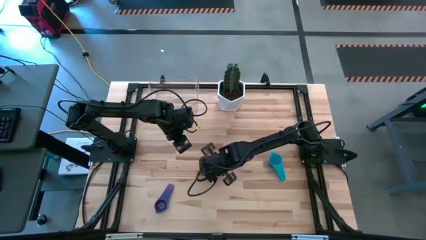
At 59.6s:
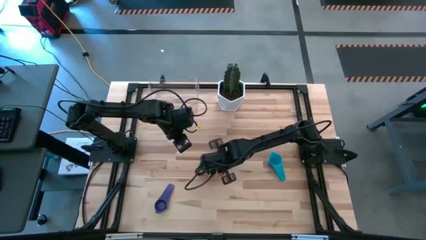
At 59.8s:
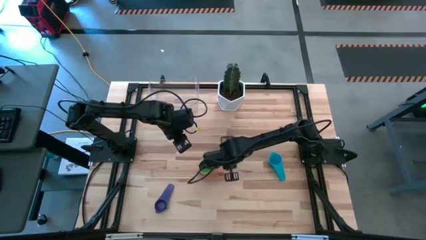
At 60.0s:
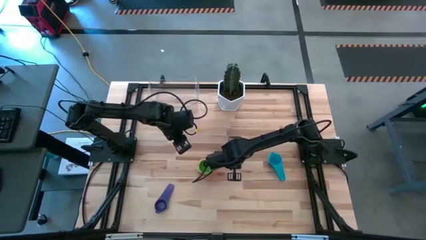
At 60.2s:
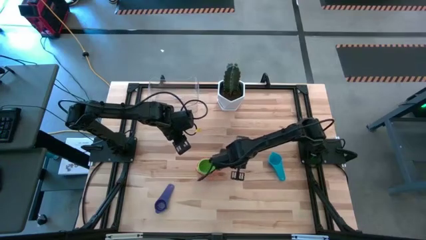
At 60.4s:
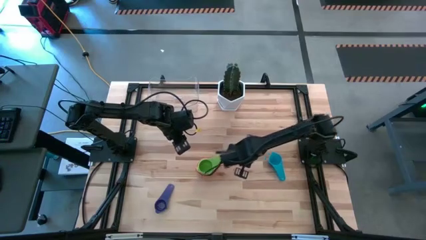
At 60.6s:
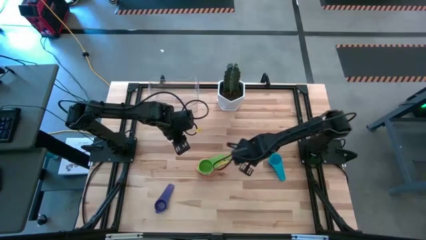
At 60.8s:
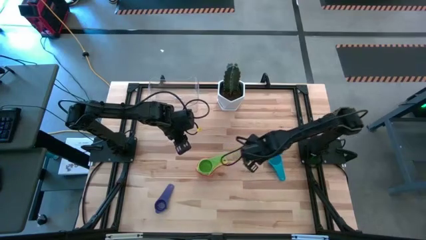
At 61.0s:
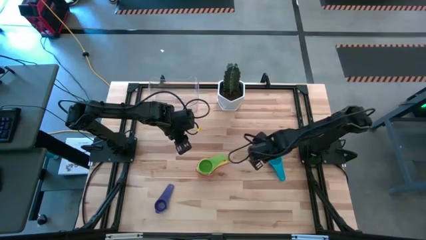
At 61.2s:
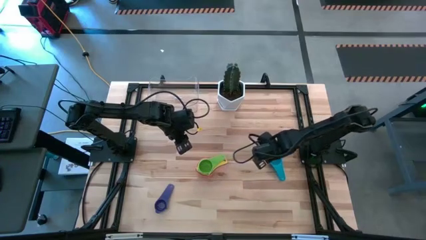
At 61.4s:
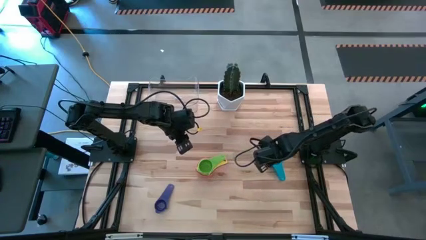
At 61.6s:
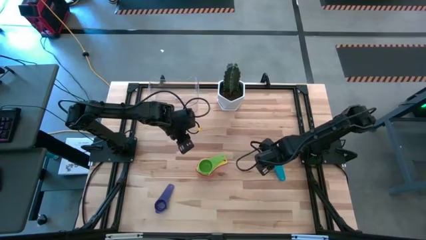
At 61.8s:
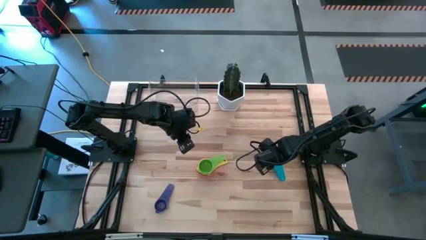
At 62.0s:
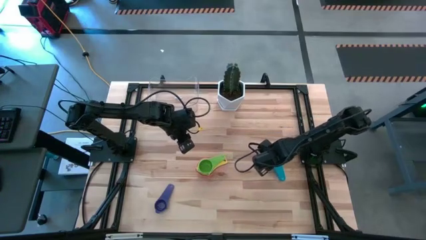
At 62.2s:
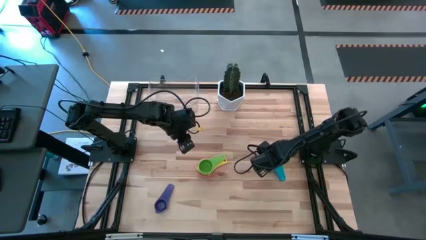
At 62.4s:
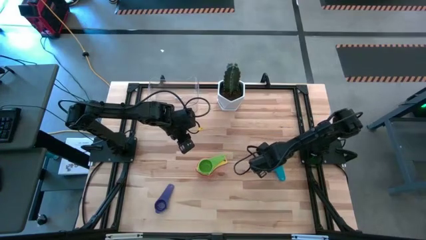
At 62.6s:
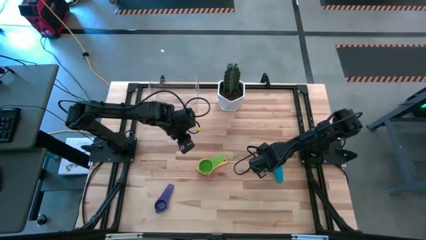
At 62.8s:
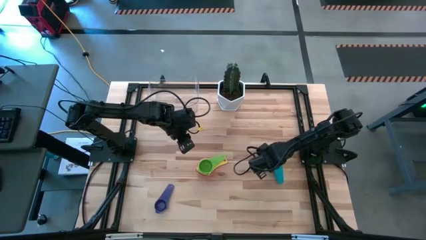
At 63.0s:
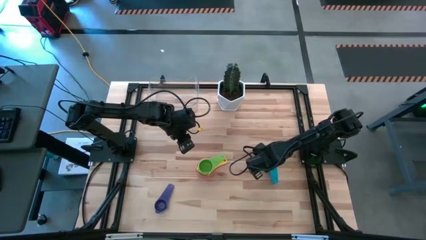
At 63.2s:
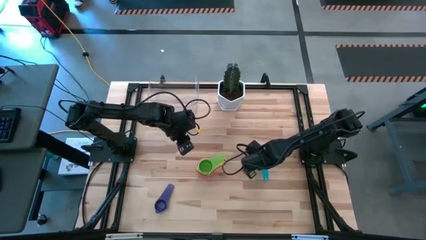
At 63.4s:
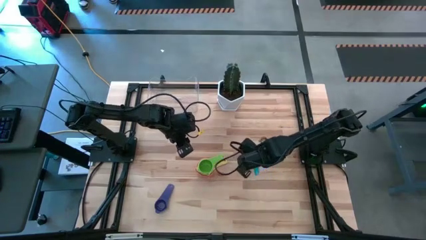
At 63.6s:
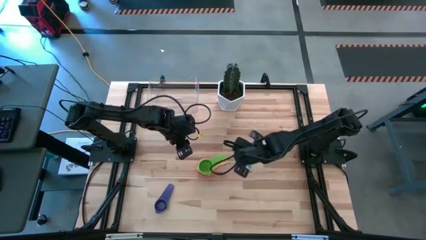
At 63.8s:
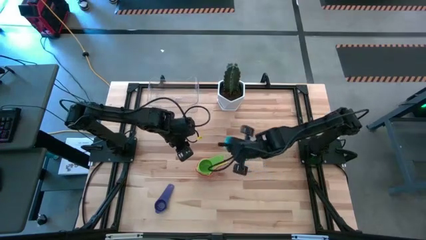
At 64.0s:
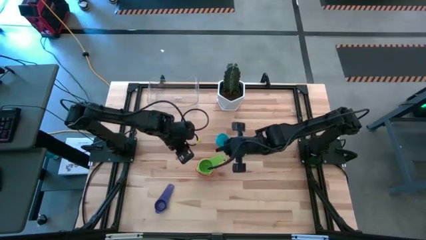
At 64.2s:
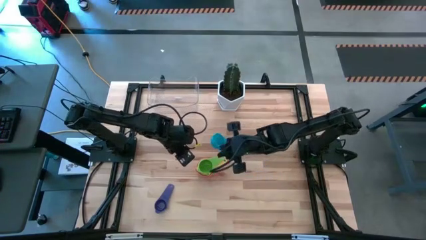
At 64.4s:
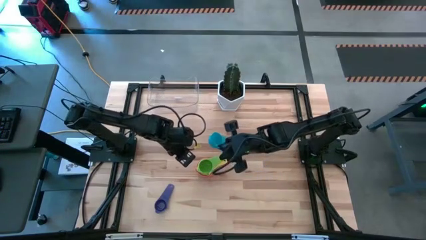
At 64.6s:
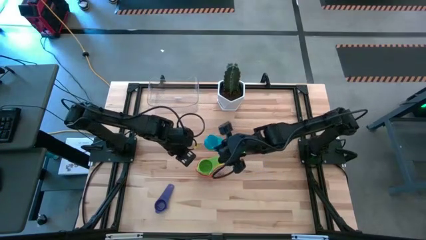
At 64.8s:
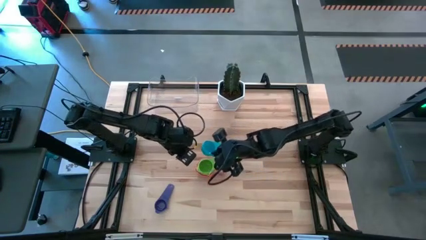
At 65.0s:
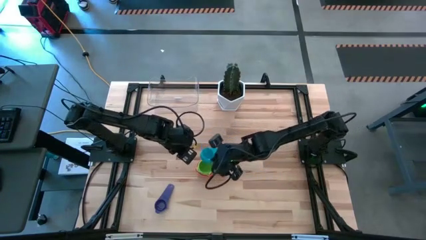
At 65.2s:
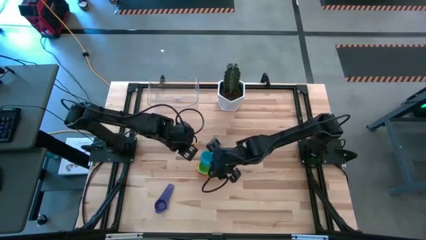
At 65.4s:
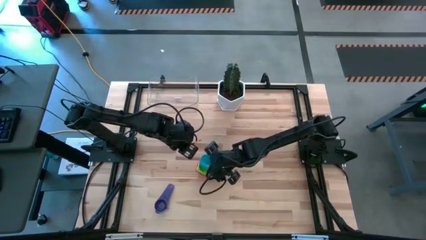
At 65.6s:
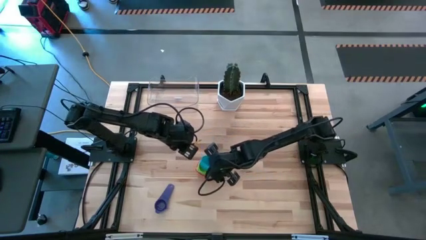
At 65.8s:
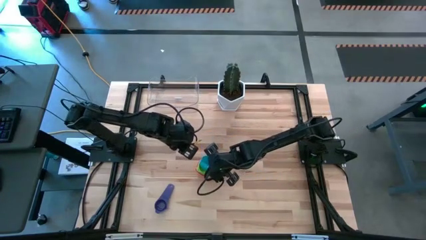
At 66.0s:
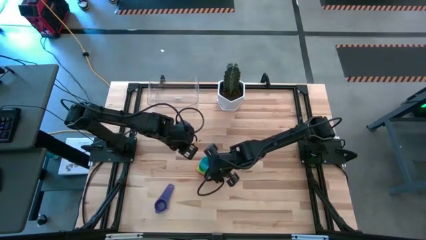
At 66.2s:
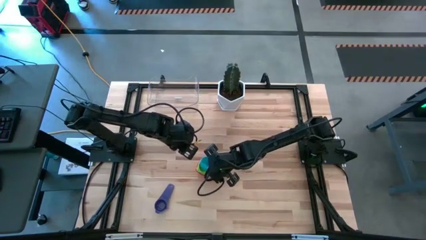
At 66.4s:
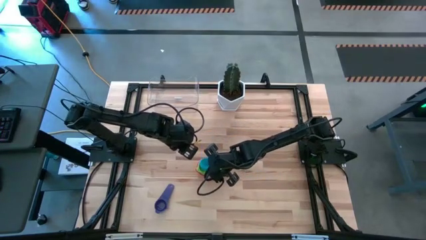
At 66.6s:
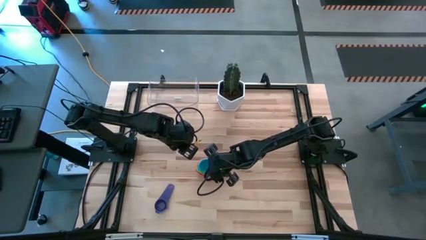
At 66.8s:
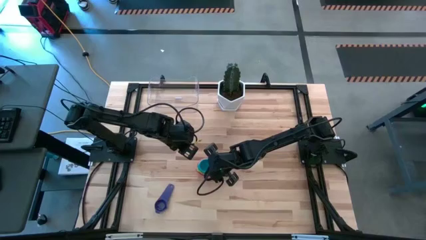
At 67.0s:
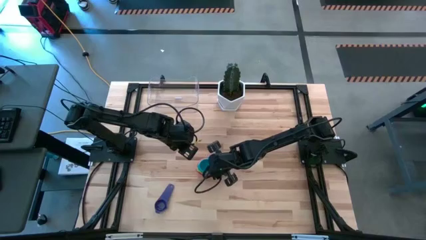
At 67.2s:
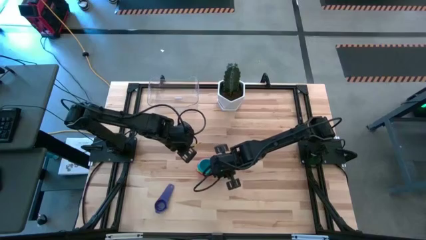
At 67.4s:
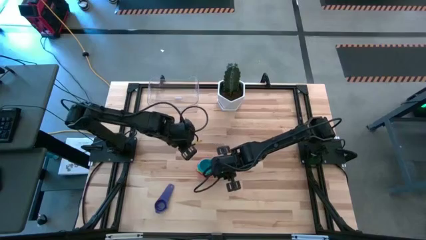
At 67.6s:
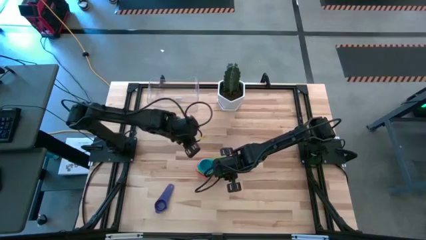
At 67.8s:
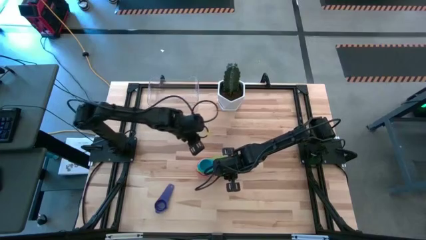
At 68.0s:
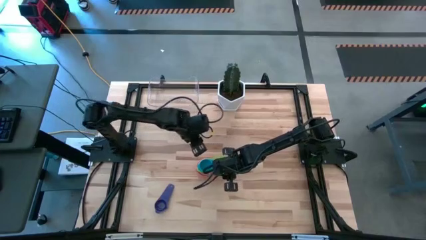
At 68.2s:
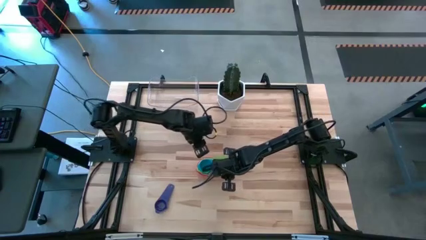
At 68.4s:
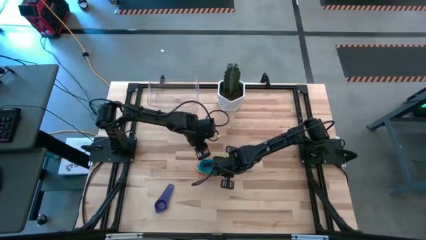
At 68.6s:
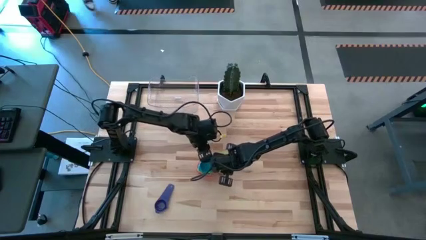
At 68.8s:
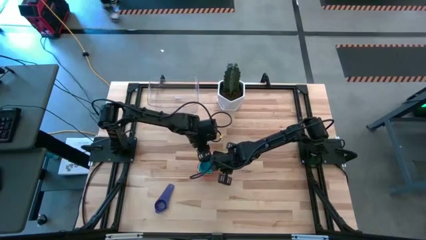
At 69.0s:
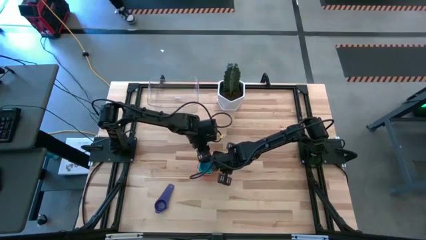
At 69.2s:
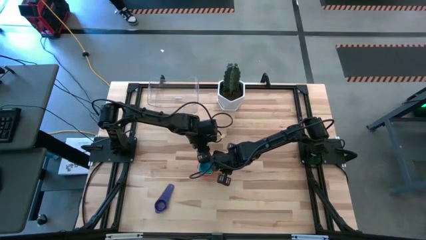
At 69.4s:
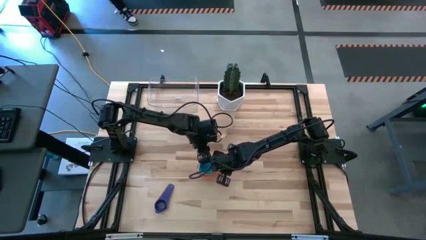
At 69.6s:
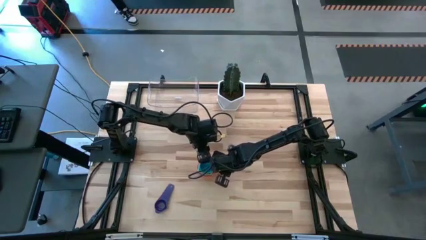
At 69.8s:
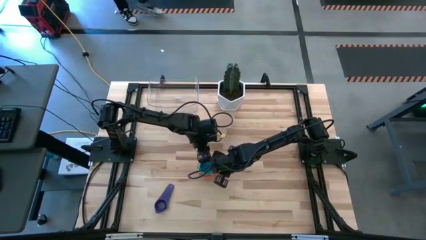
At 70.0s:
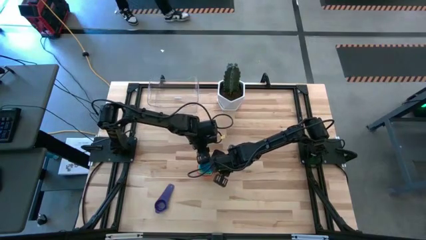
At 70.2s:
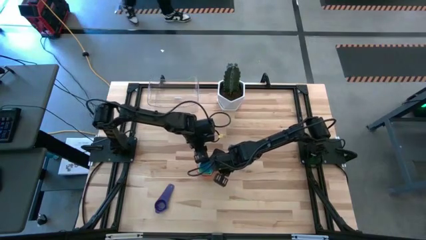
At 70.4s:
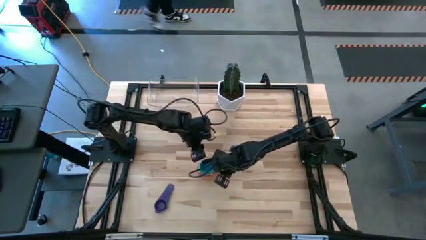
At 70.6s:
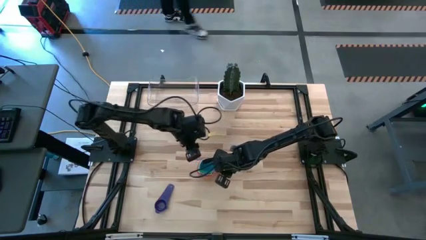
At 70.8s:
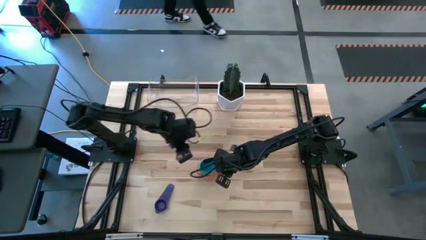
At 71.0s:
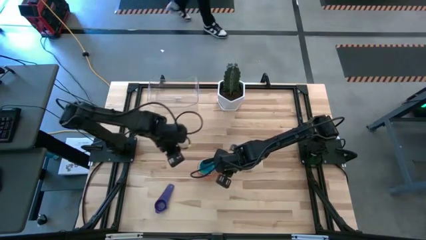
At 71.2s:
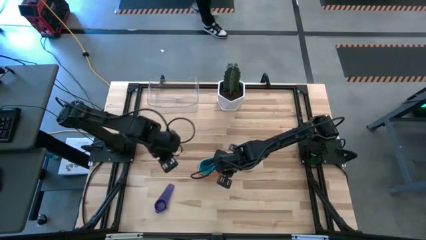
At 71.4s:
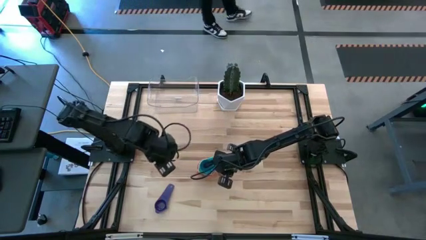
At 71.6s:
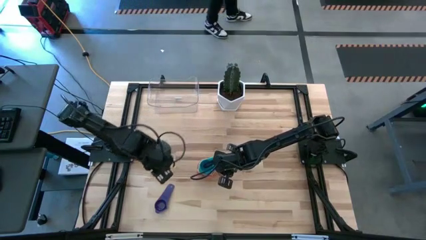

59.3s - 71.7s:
Task: Nest measuring cups in basket
Stack the light blue measuring cup on top of the green measuring cup

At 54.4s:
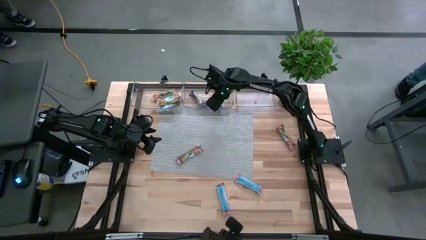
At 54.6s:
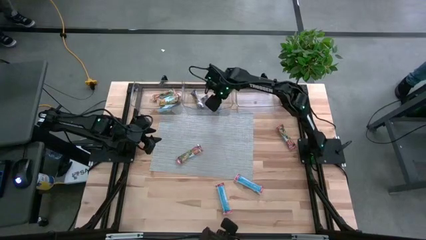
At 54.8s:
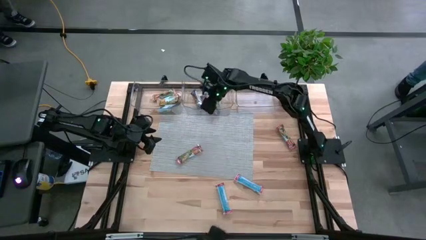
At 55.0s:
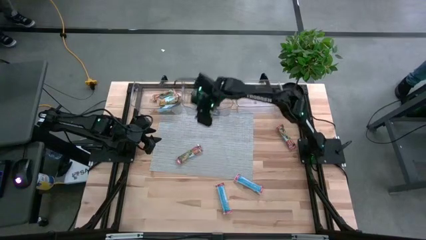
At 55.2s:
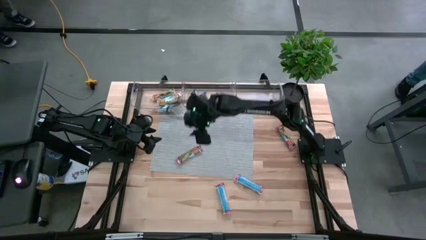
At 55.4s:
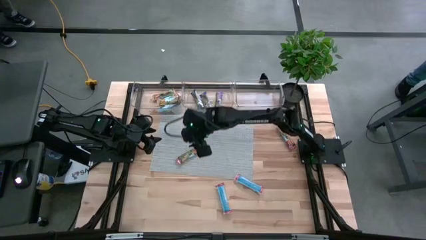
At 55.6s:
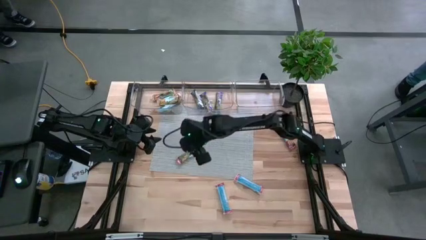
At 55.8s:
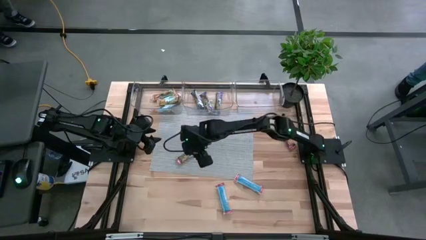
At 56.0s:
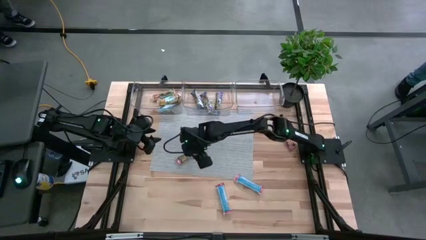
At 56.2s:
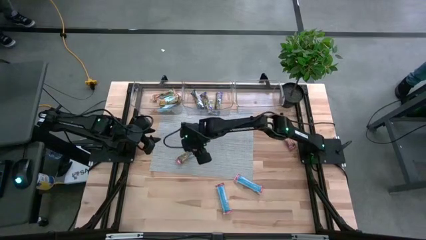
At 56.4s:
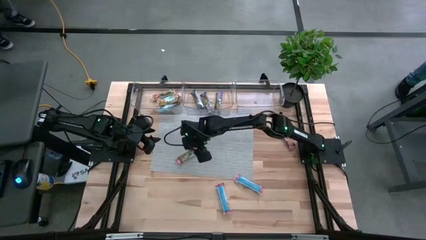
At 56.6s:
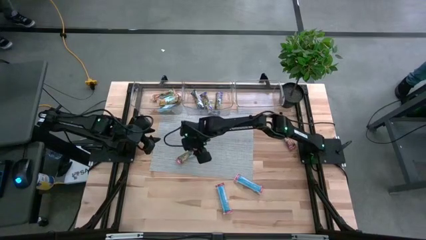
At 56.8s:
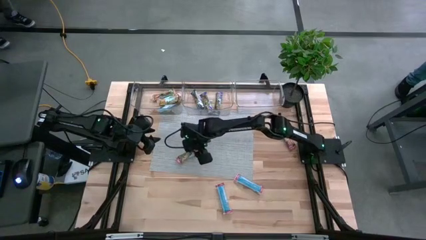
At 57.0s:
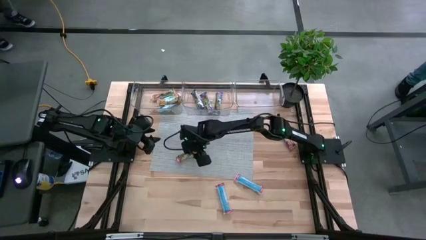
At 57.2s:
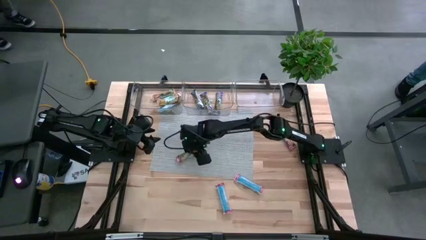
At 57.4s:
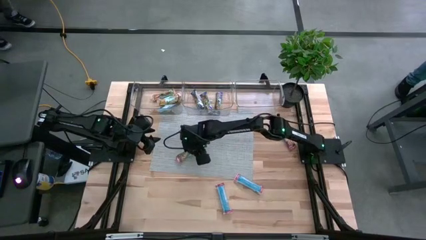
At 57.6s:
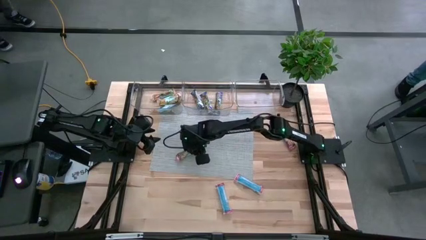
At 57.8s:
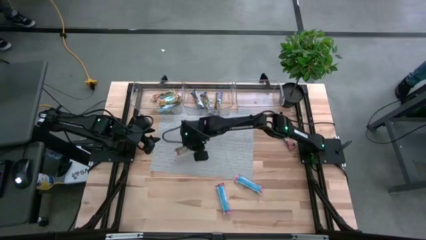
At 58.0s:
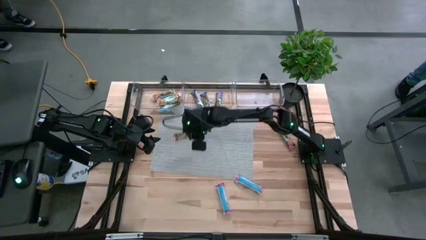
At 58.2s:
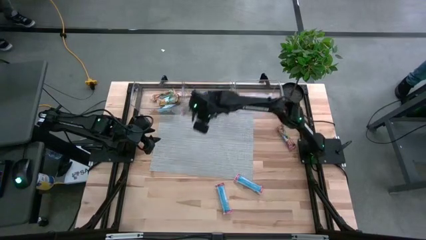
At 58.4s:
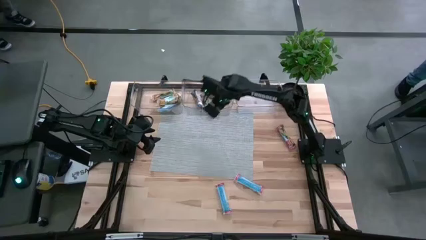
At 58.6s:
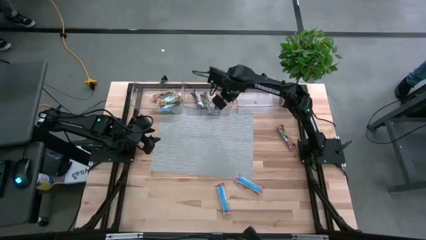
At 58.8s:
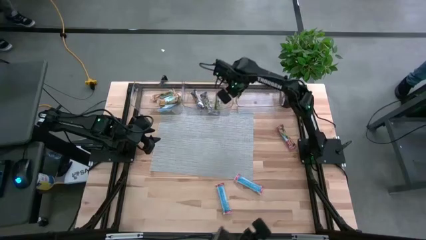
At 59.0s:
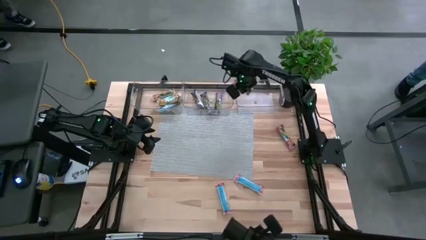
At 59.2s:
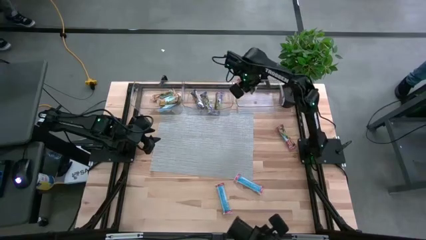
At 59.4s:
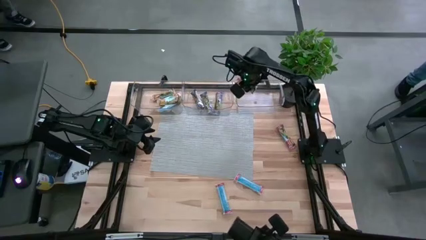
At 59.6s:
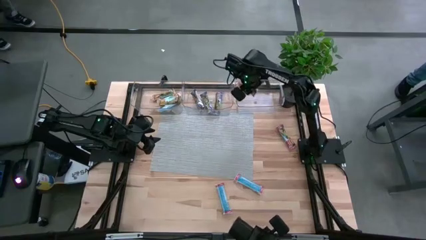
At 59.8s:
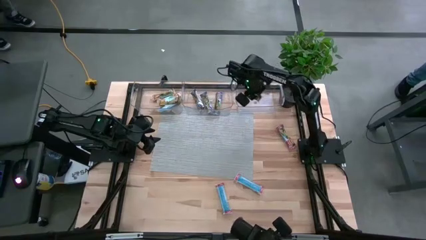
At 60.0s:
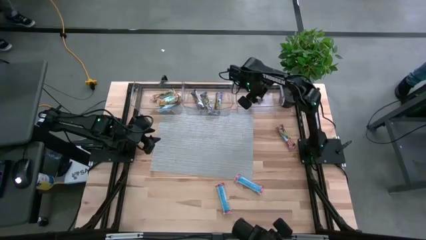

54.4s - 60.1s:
Task: Pick and place Granola Bars by type
Put the red granola bar into the right transparent bin
